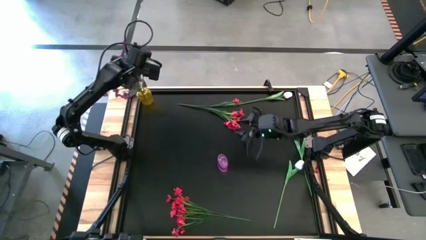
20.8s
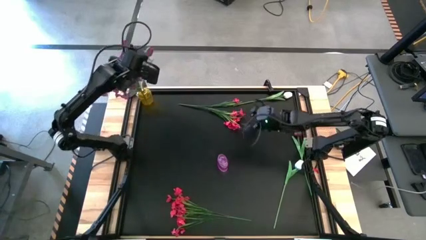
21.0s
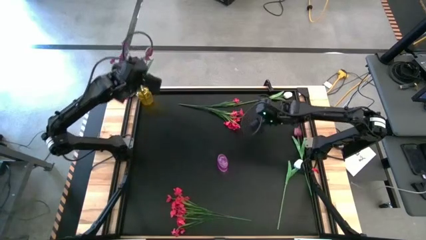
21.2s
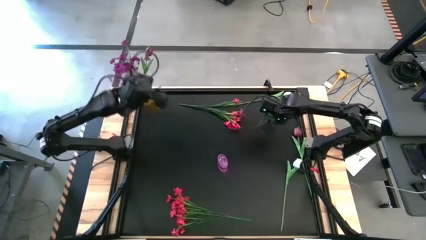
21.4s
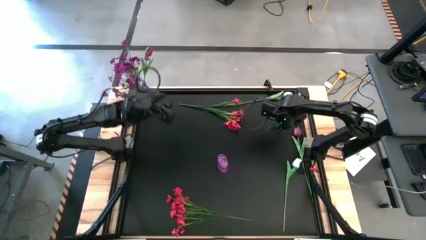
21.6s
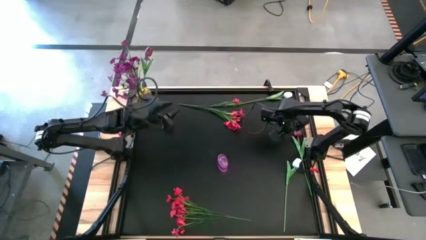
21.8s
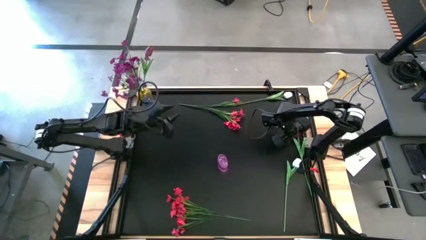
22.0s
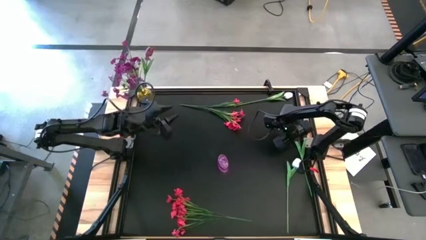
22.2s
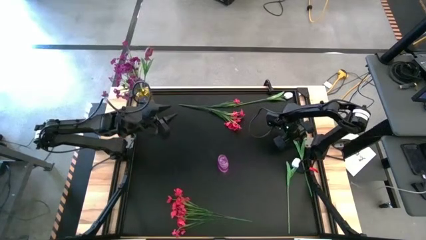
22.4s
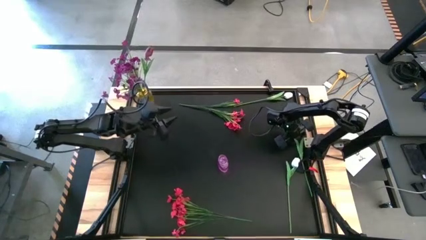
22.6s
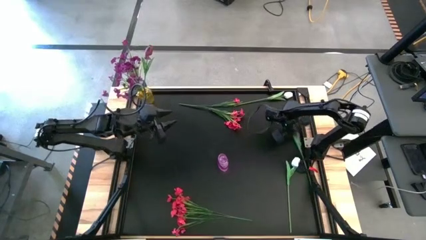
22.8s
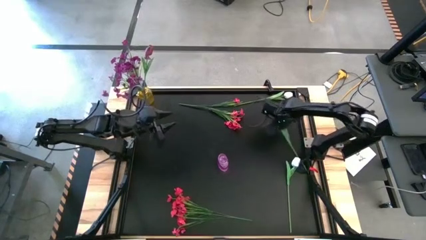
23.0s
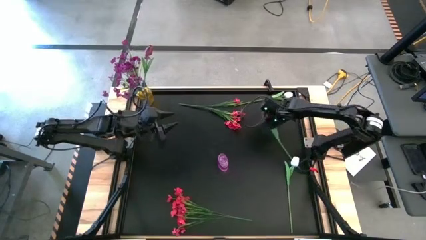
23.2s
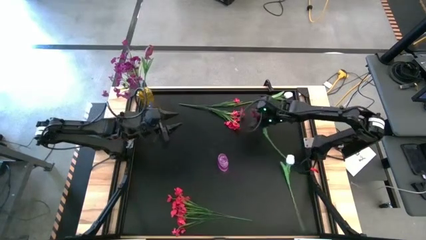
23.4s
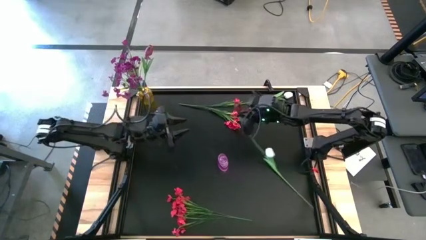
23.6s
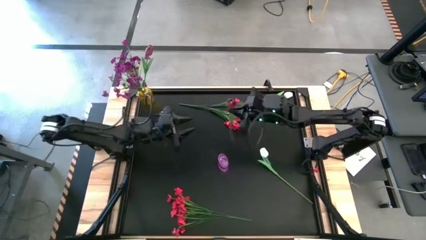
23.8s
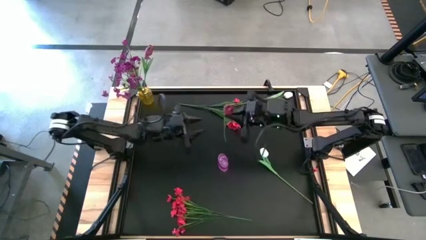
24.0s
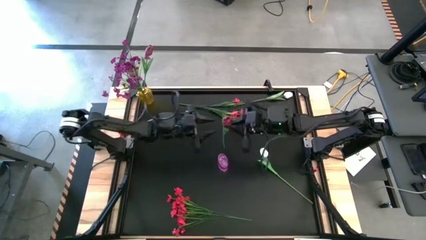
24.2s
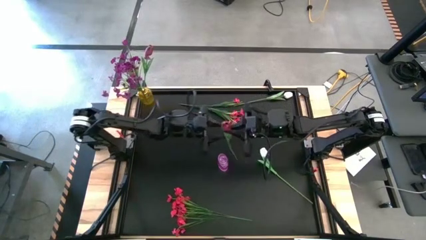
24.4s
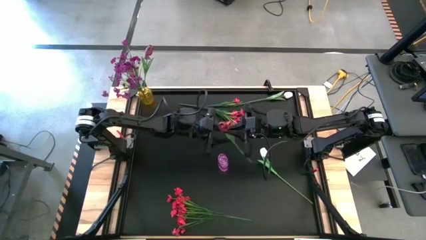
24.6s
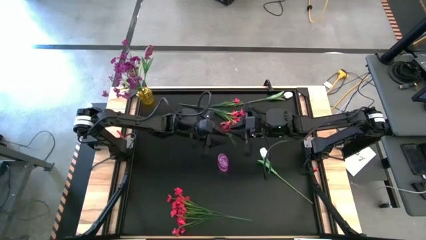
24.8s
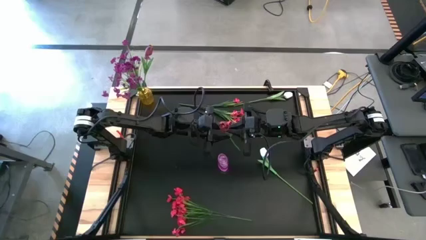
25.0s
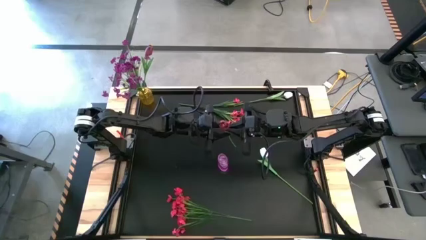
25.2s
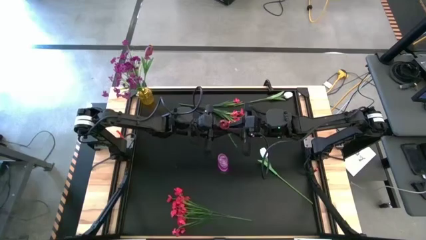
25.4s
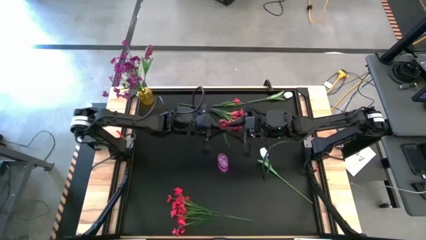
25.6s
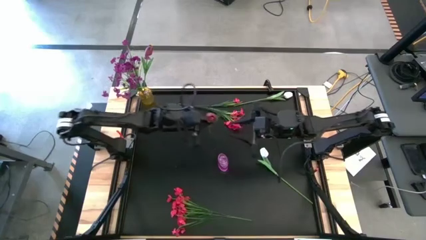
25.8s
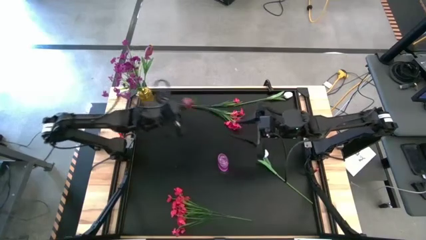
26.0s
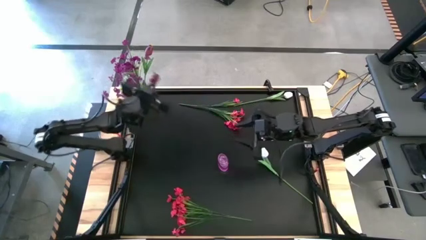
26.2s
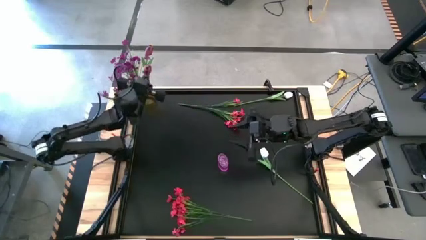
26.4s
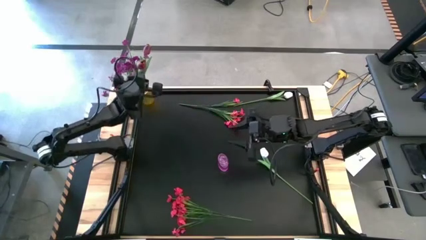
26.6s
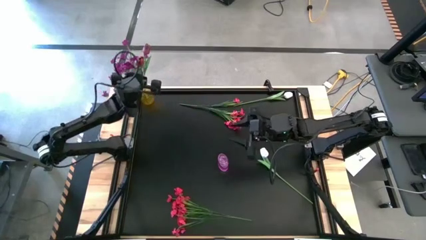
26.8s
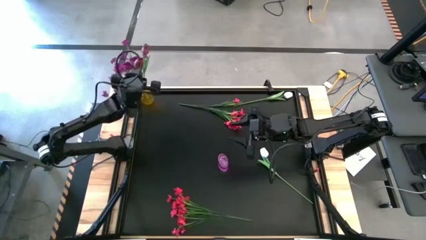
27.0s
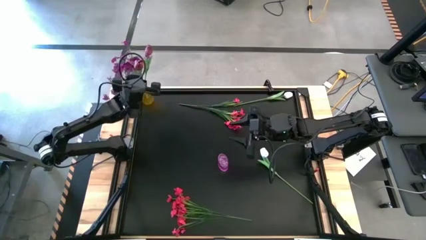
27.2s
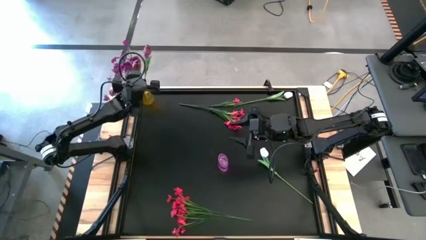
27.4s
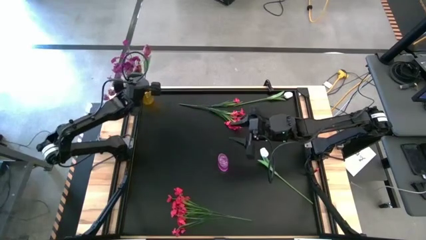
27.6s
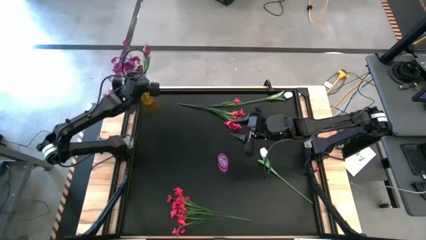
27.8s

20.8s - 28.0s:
Task: Sort flowers into vase by color
Put the dark red tulip into the yellow vase

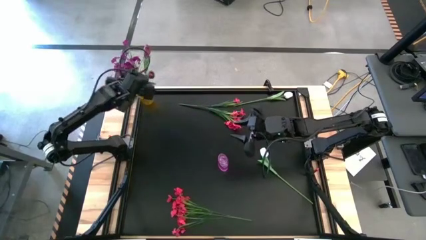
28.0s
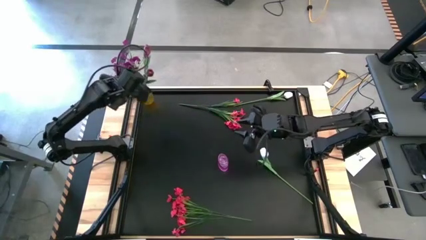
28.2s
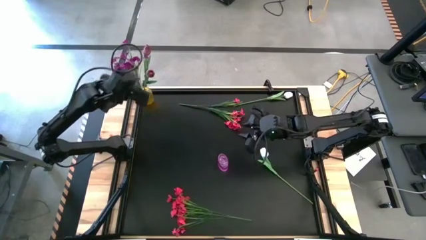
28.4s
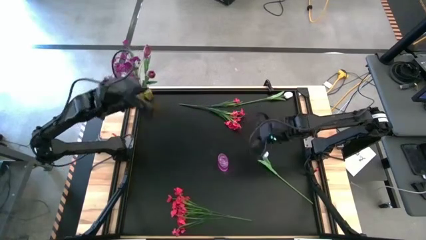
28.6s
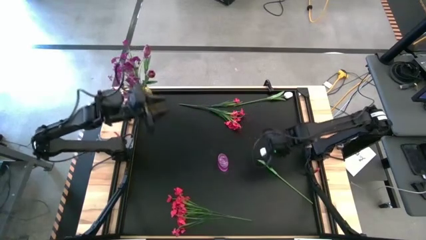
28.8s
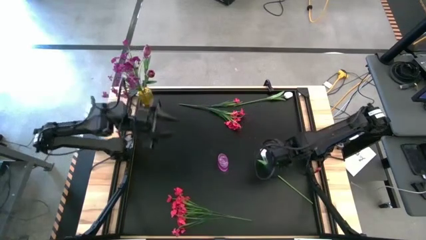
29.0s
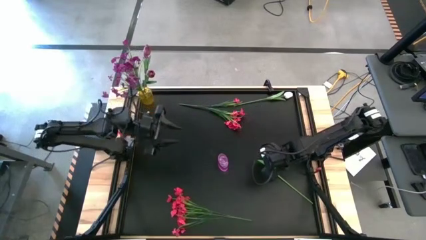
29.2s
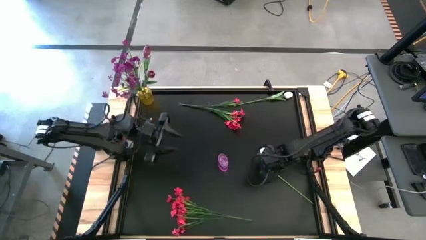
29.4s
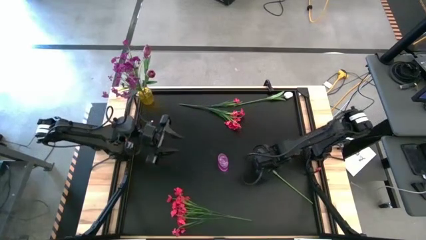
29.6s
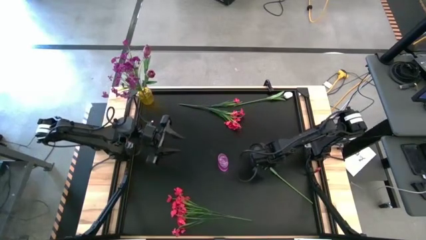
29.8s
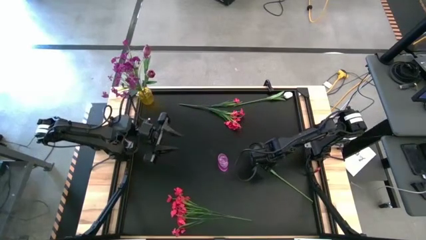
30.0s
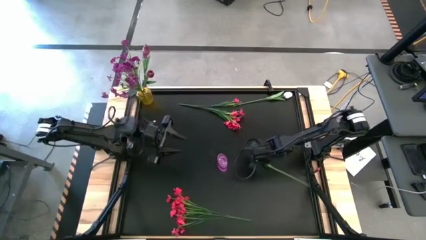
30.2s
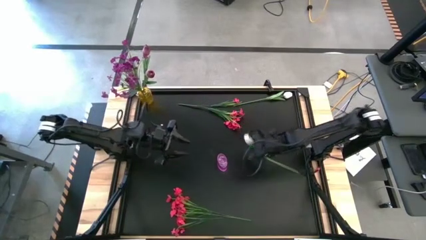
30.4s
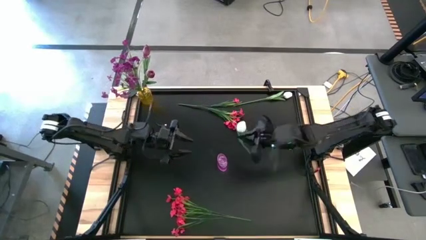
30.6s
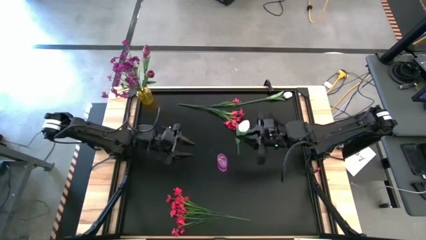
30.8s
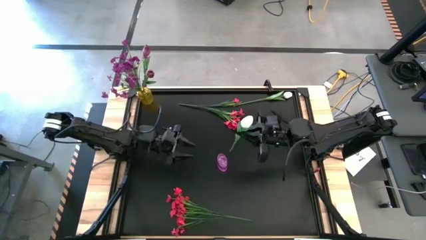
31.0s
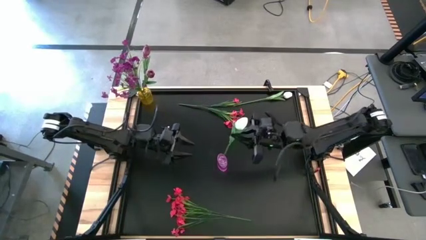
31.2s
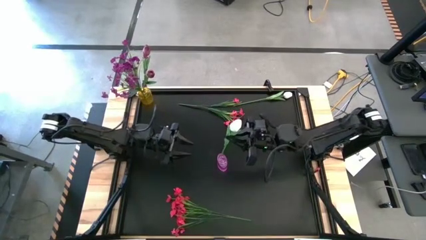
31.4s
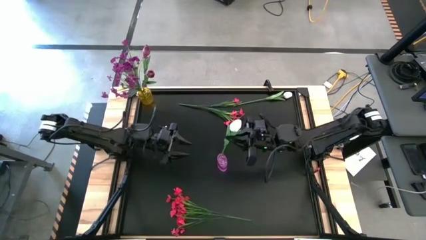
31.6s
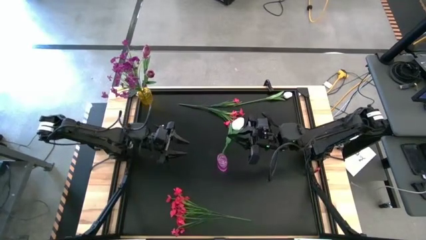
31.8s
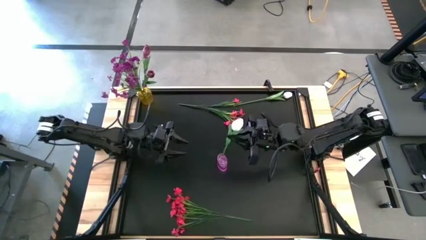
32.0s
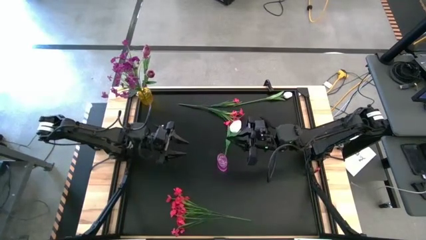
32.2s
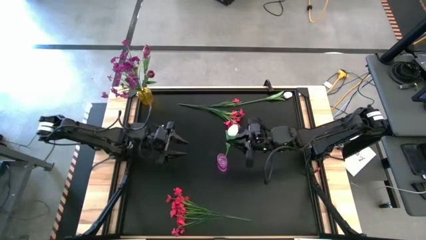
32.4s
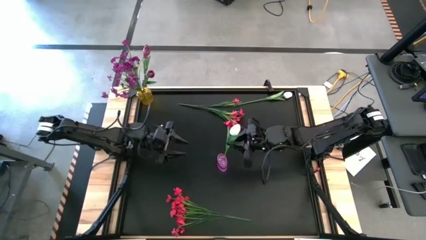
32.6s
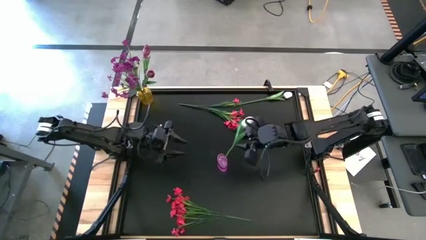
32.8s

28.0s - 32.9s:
Put the bottom white tulip into the violet vase

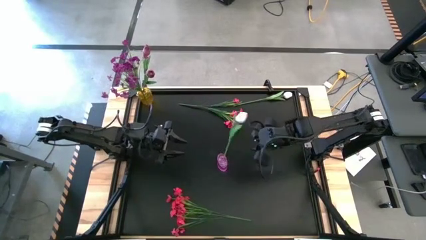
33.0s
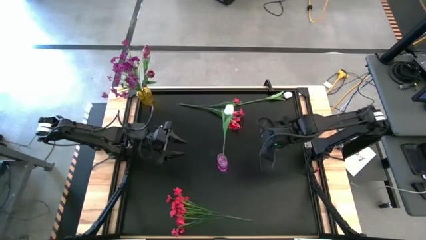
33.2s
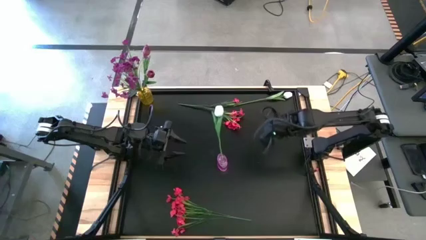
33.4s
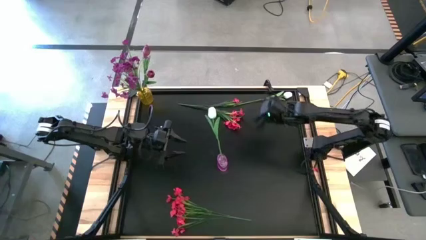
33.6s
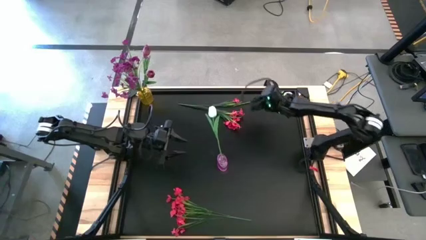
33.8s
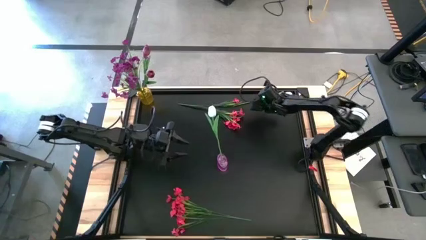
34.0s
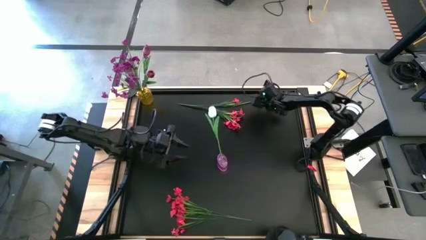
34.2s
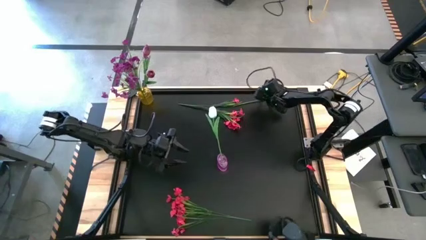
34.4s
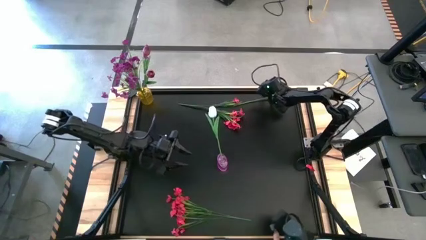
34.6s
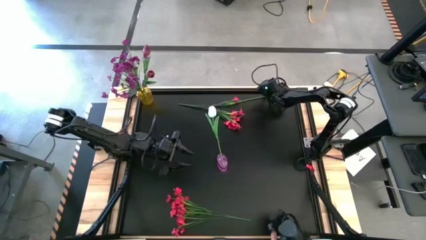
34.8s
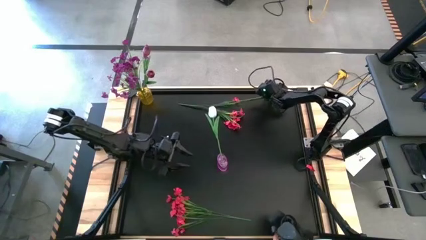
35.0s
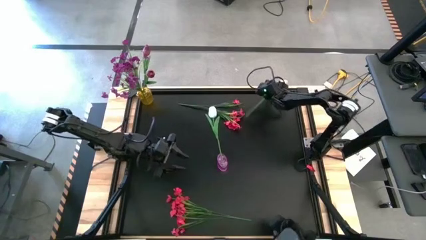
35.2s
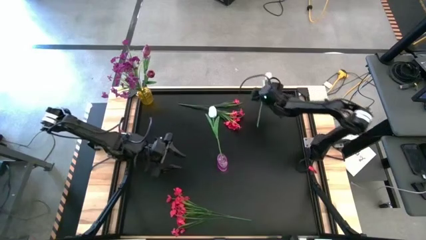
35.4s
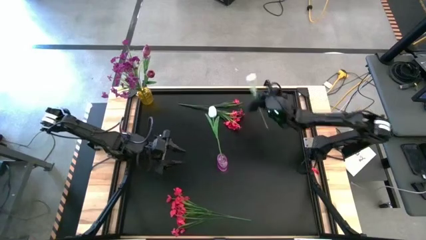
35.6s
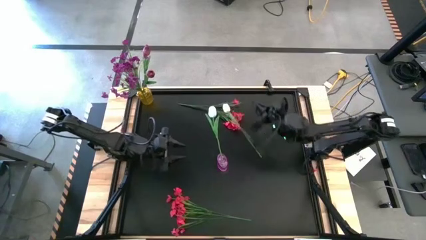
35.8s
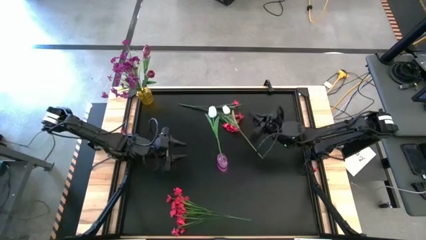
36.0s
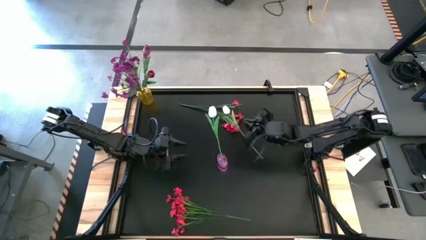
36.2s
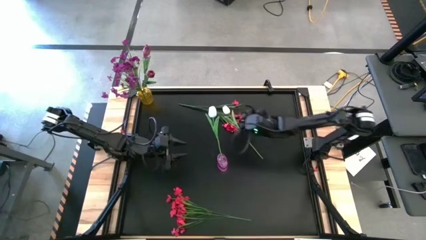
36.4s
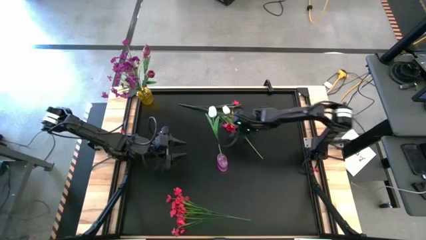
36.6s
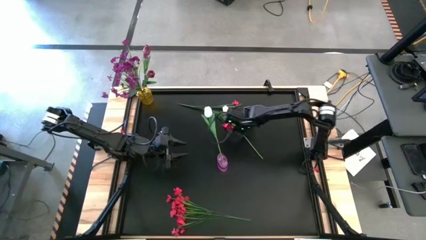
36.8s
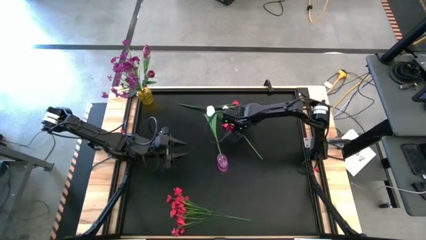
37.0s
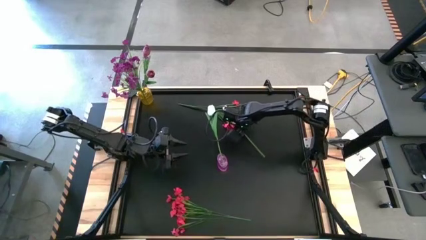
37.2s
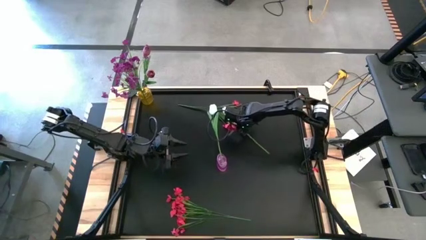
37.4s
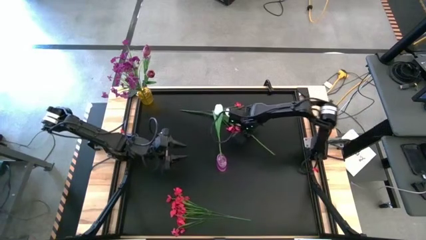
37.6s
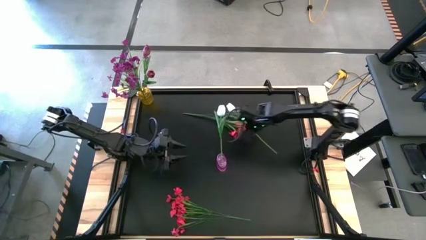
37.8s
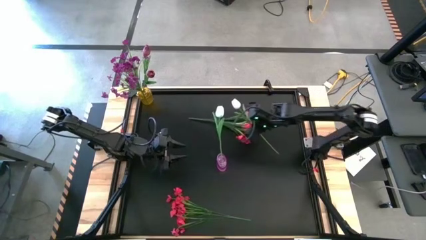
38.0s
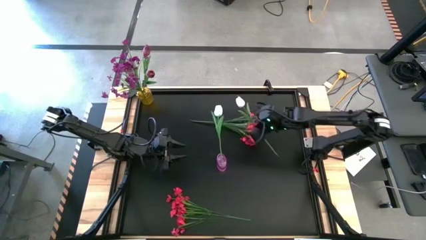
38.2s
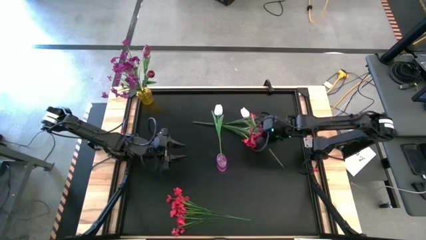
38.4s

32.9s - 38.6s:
Put the white tulip into the violet vase
